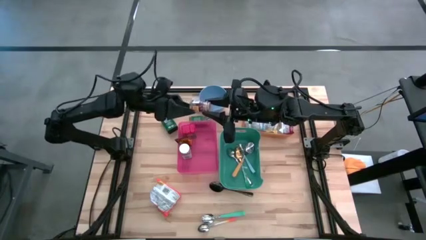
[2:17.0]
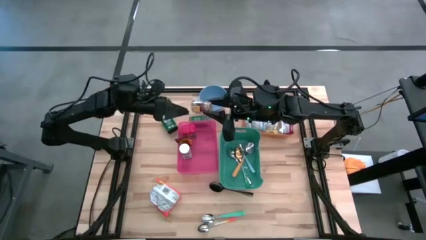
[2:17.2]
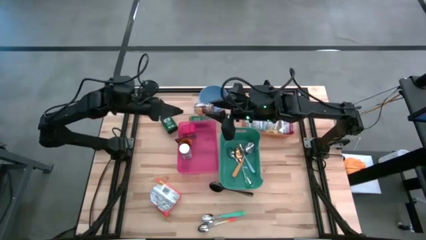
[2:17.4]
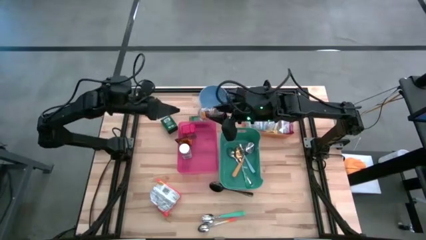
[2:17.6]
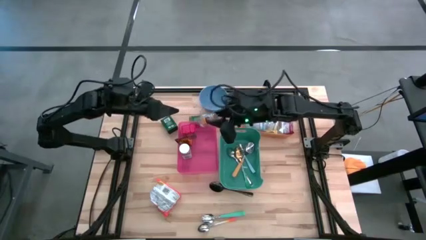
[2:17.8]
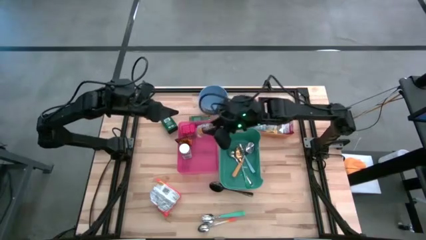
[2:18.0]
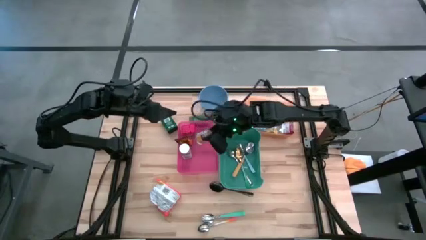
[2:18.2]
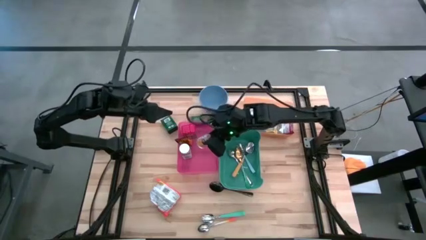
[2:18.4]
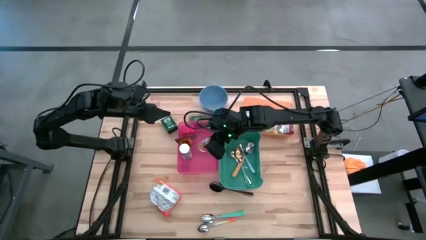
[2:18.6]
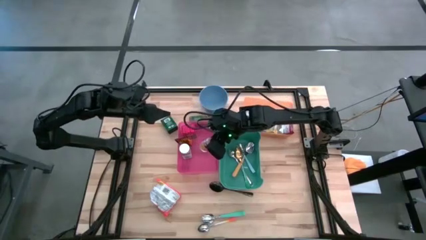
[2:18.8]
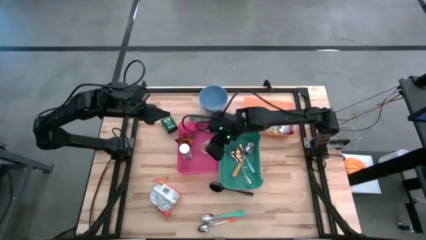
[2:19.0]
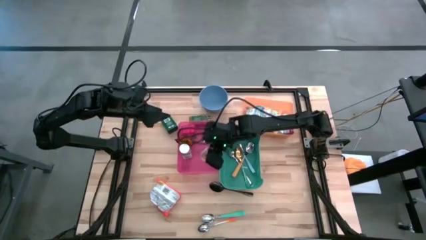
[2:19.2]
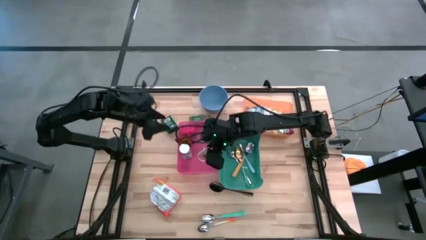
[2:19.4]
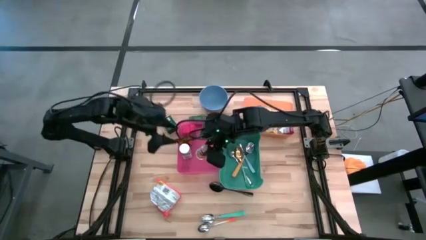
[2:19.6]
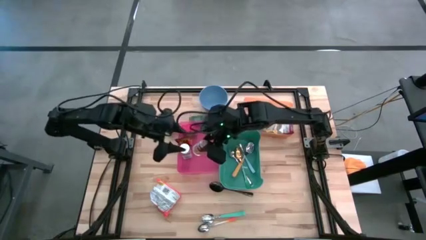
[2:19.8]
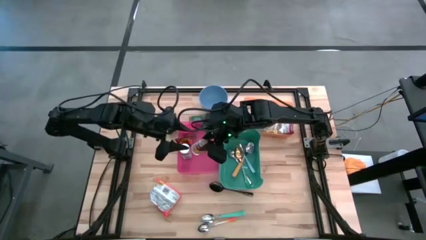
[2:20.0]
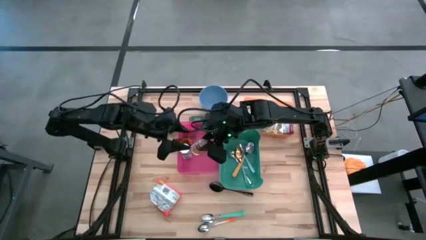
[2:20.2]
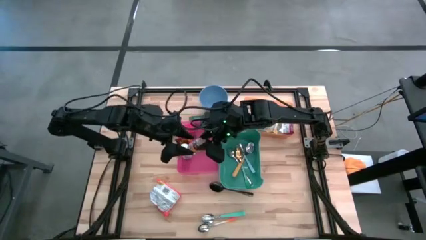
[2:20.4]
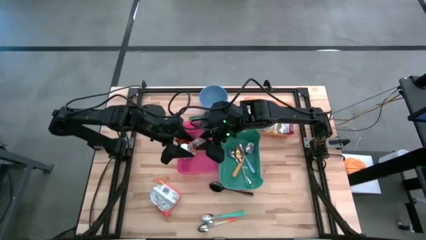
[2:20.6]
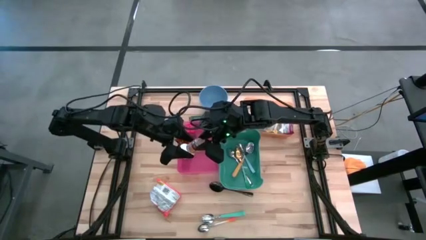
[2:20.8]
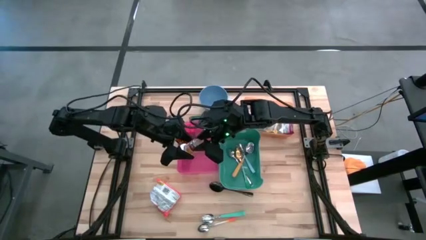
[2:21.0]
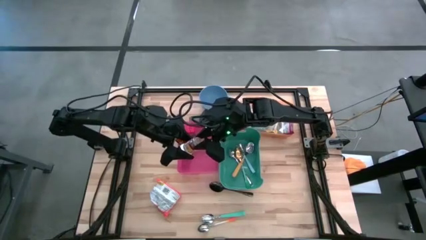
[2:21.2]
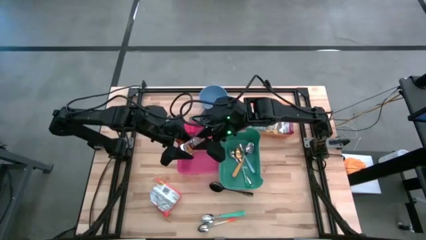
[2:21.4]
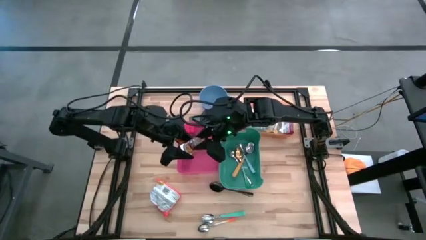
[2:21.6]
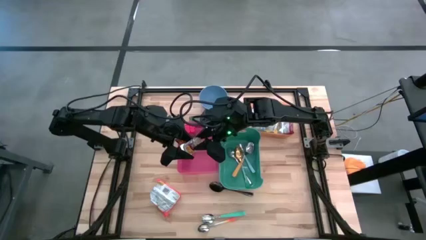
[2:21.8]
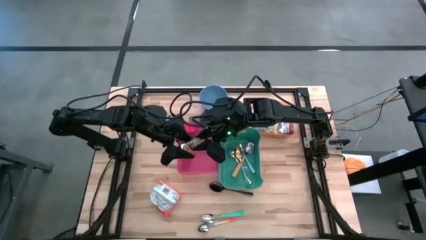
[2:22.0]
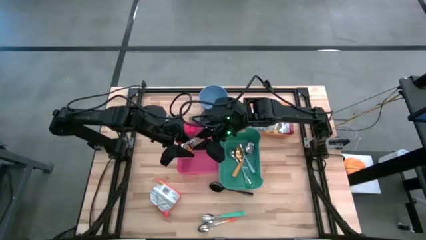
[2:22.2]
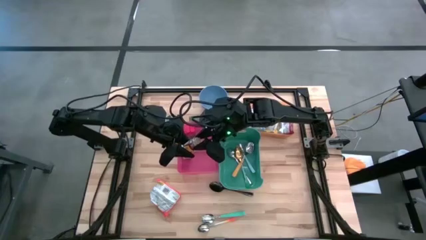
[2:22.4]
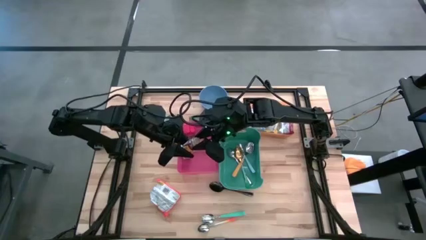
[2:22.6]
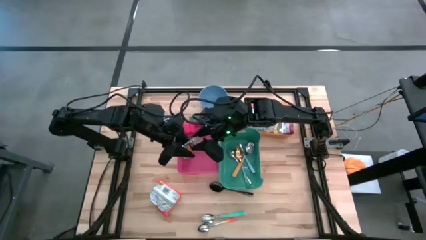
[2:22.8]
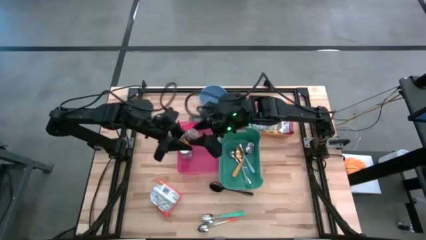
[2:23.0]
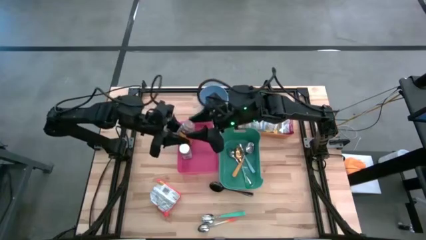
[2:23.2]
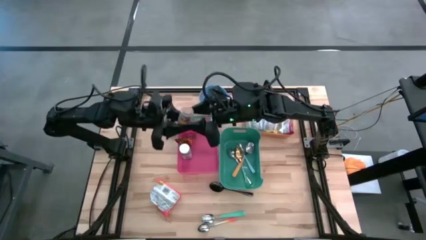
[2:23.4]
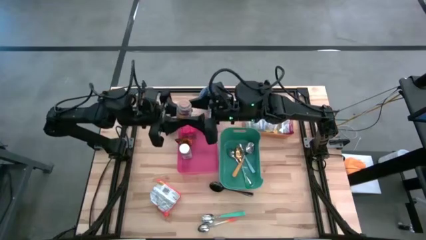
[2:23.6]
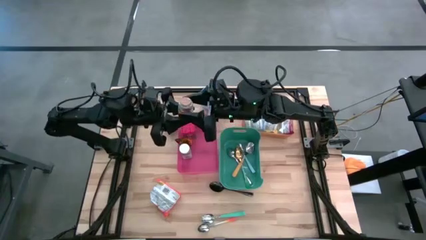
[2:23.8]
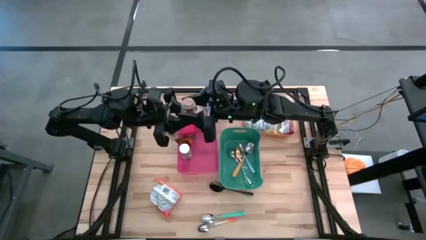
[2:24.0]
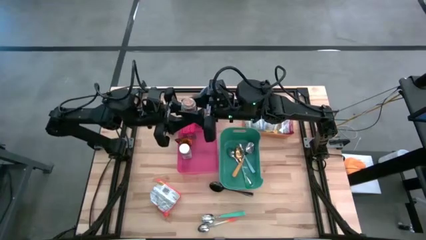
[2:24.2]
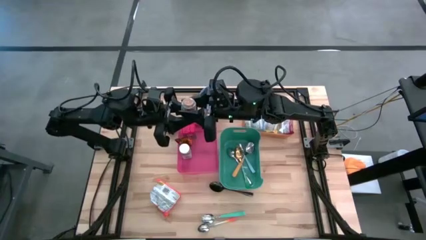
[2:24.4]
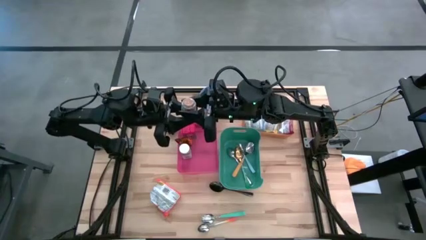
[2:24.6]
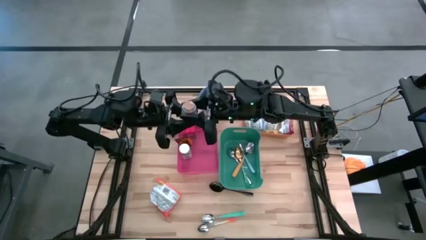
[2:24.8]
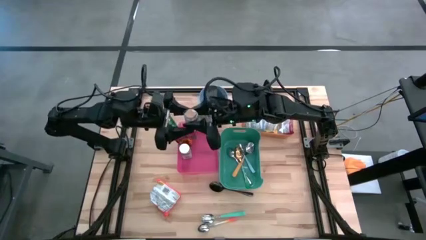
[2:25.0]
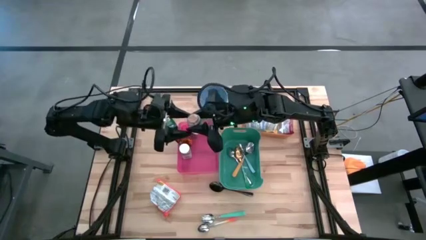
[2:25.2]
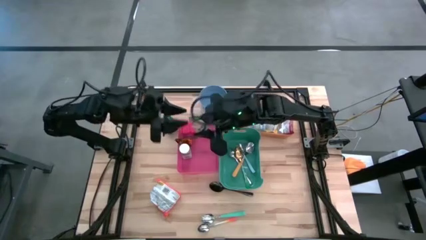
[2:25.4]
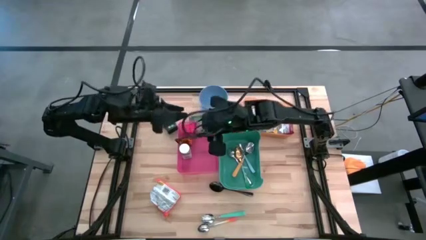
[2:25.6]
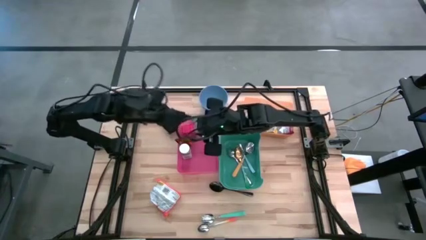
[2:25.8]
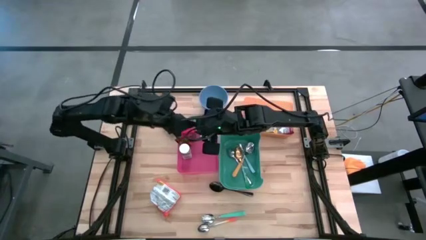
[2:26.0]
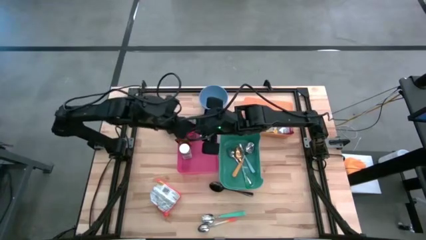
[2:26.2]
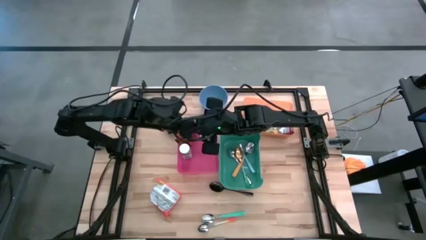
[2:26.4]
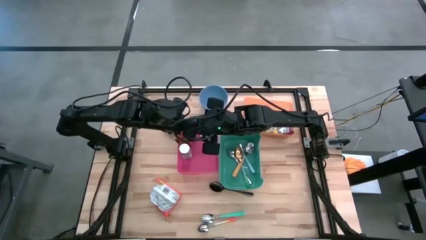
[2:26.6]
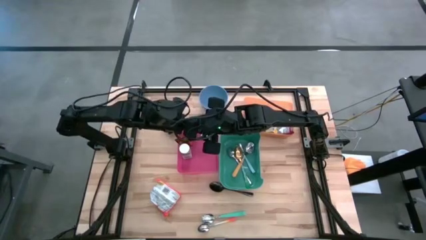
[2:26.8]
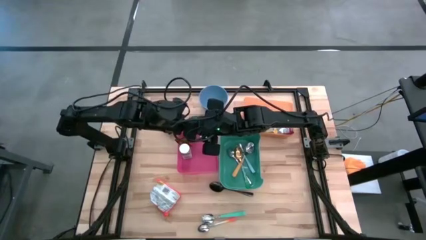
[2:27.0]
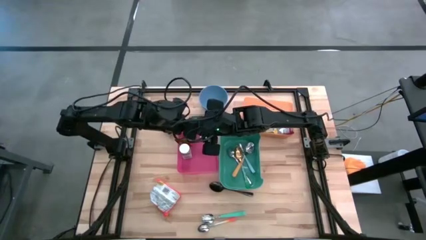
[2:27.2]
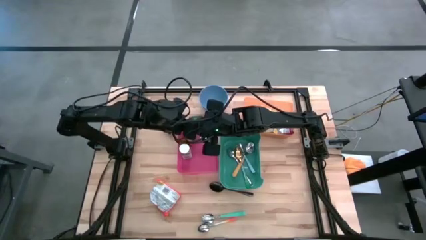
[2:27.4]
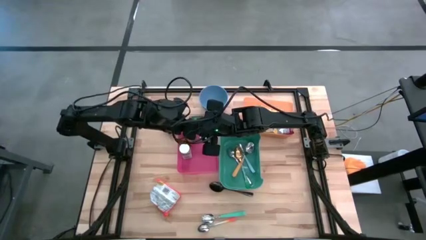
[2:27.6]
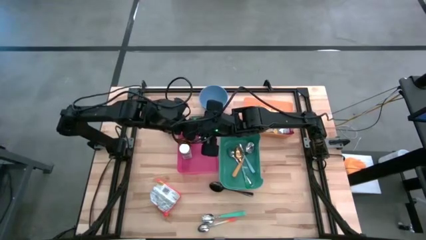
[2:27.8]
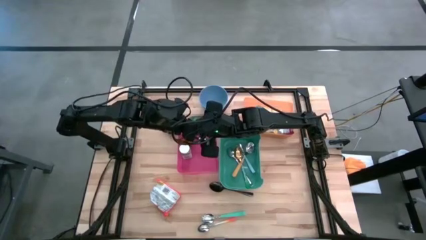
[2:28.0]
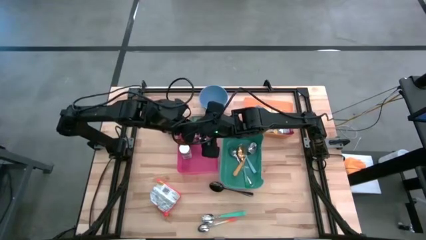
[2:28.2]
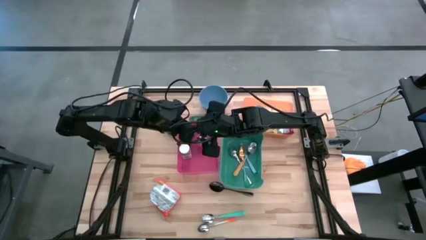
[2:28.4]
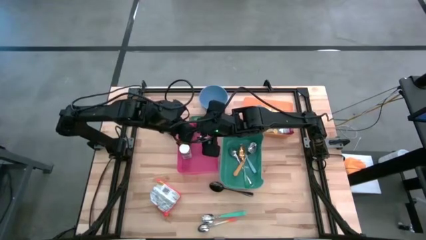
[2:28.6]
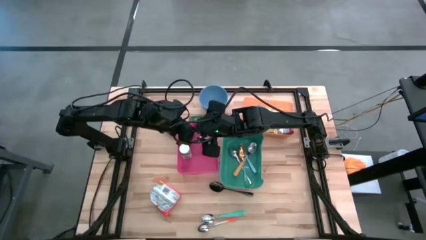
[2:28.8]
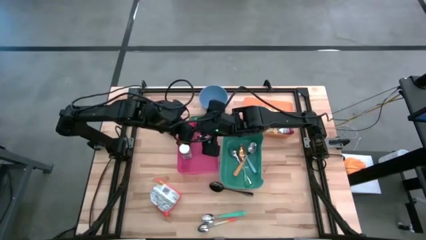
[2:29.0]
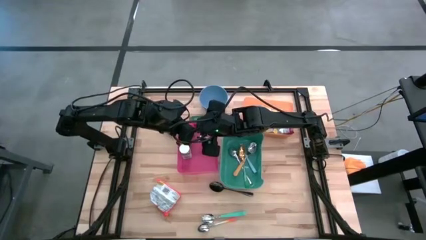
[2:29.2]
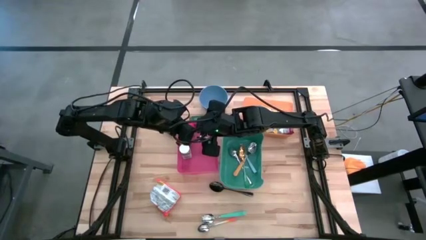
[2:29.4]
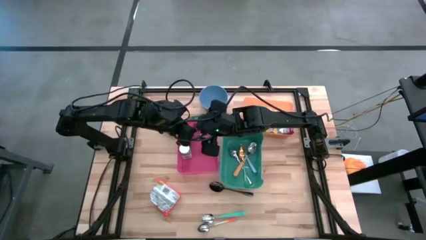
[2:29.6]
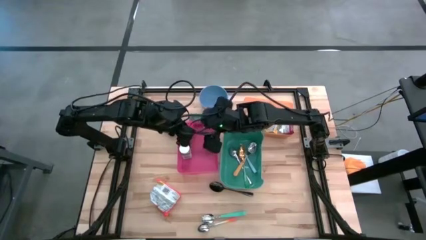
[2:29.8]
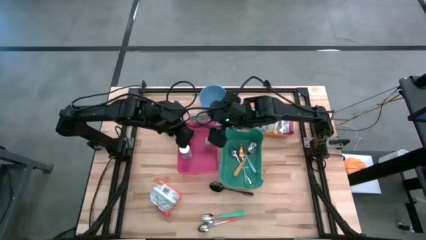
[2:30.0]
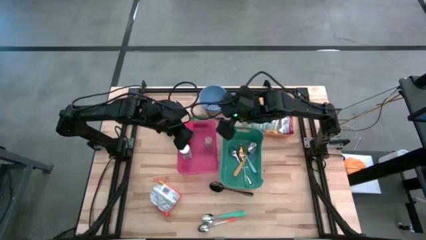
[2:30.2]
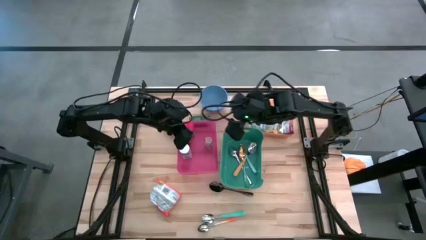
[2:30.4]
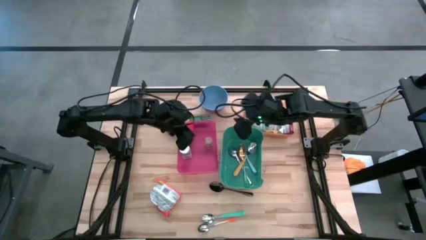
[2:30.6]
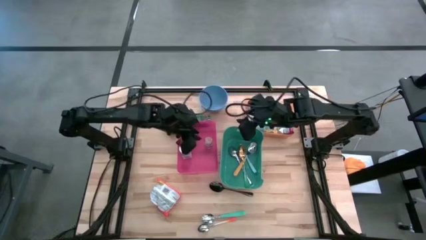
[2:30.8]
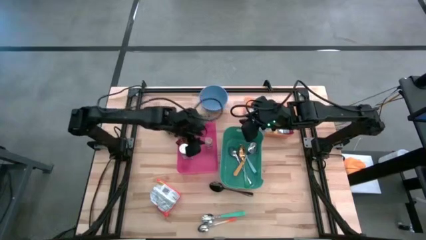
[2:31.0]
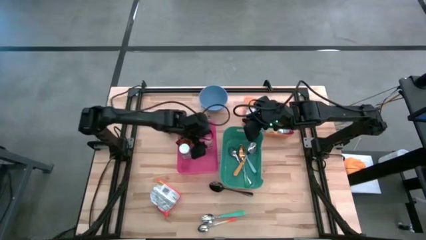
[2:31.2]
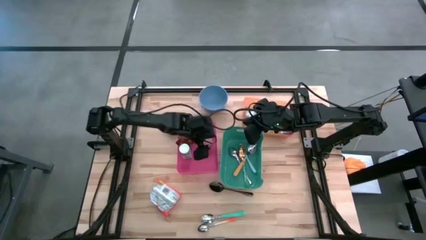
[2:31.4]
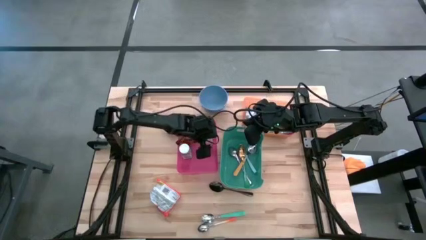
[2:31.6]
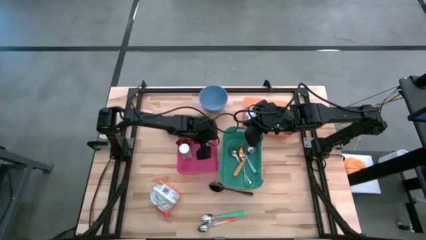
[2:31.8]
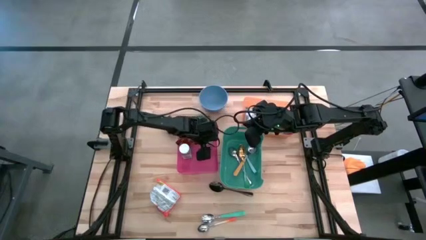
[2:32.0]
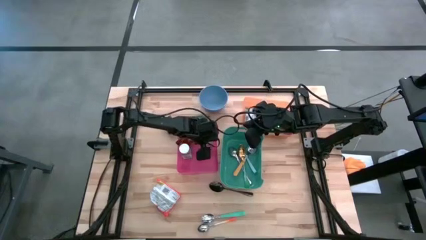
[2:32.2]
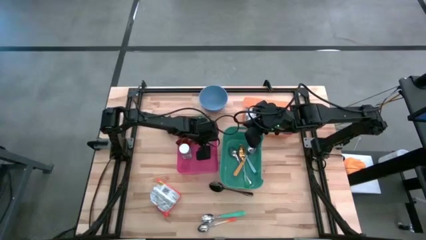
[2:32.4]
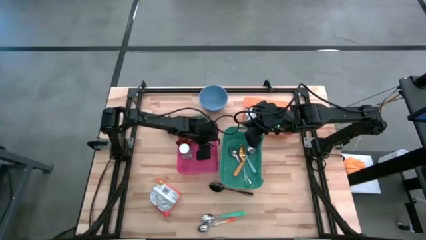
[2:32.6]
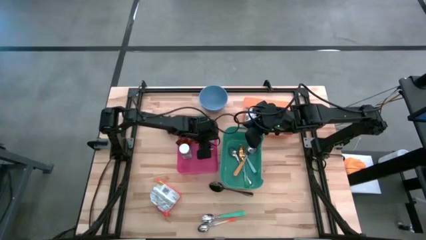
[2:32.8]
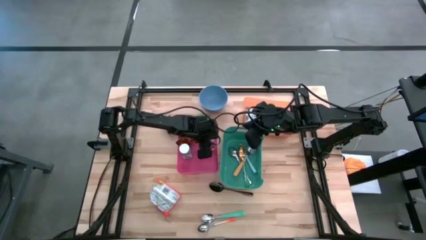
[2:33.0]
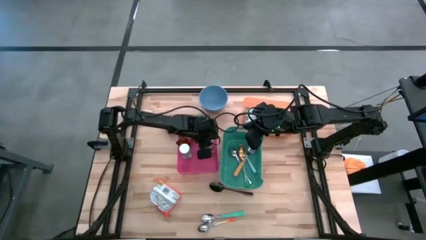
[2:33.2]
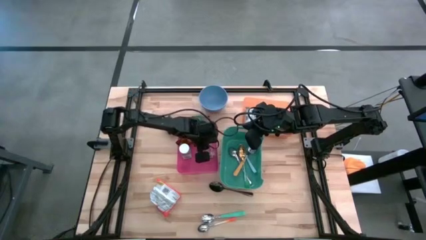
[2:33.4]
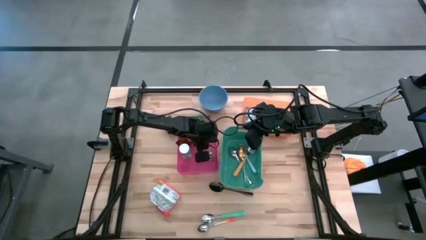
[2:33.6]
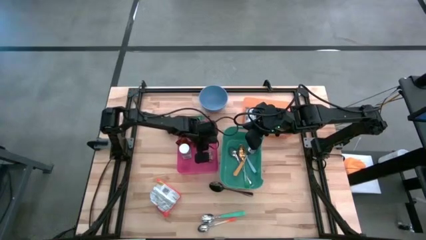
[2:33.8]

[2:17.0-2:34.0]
Put the brown spice bottle into the red bin
